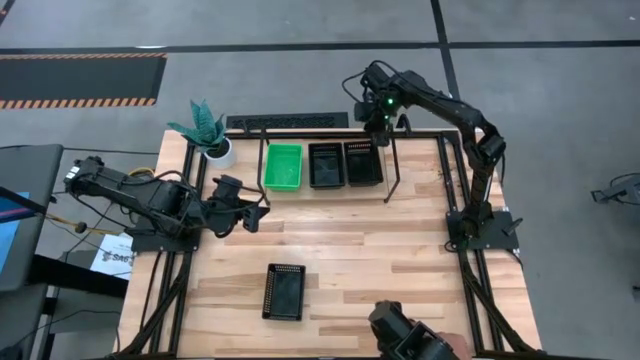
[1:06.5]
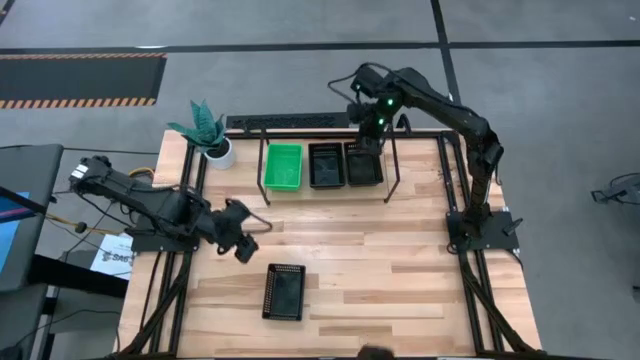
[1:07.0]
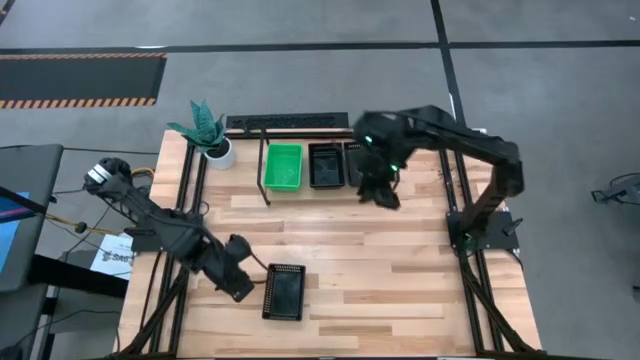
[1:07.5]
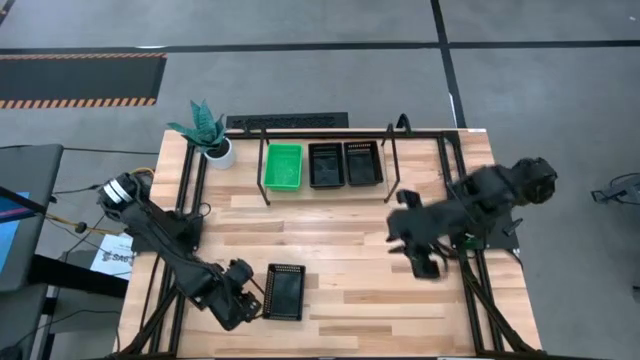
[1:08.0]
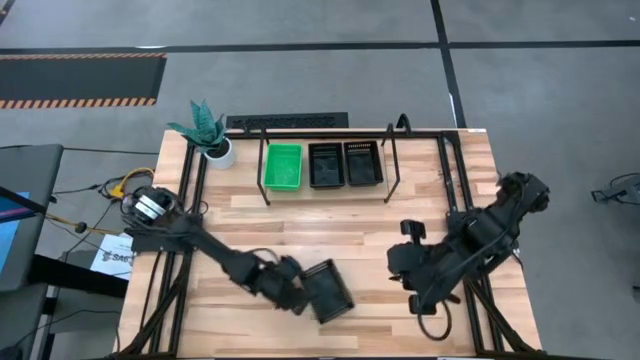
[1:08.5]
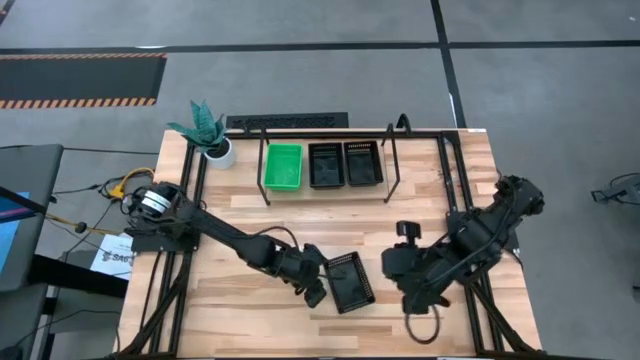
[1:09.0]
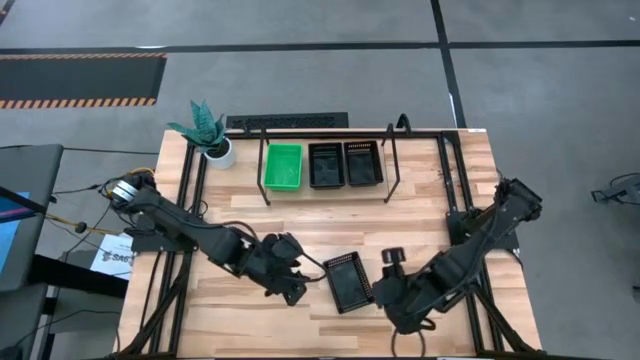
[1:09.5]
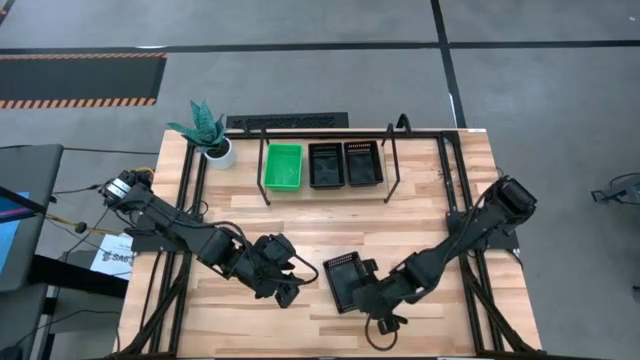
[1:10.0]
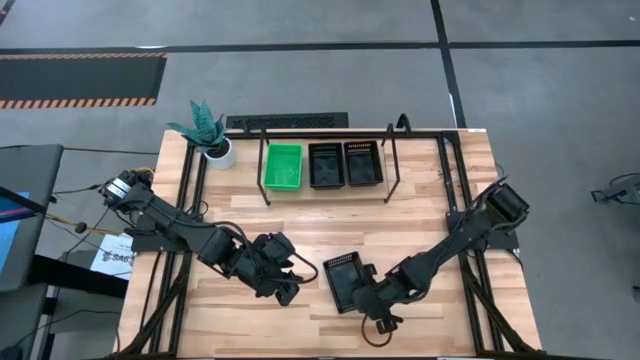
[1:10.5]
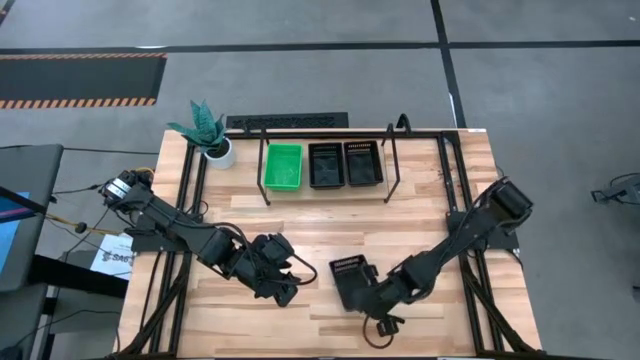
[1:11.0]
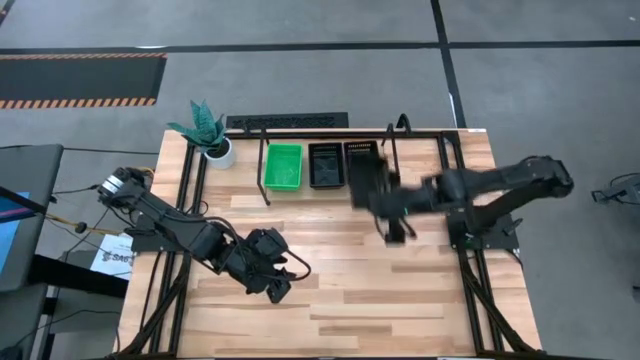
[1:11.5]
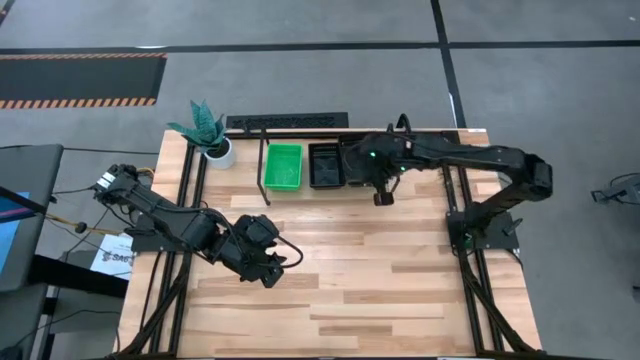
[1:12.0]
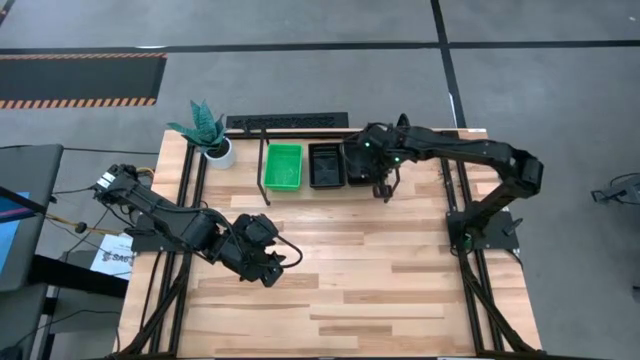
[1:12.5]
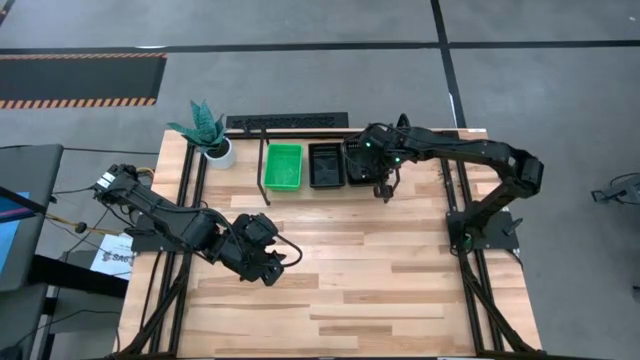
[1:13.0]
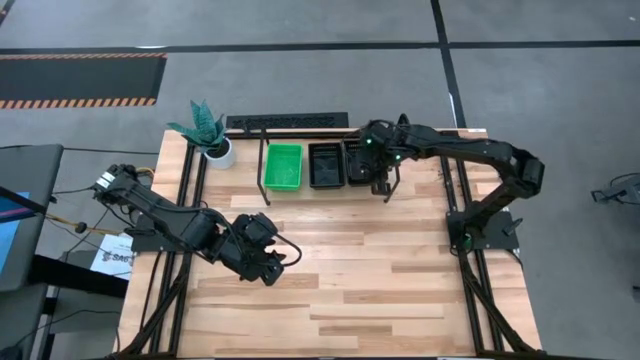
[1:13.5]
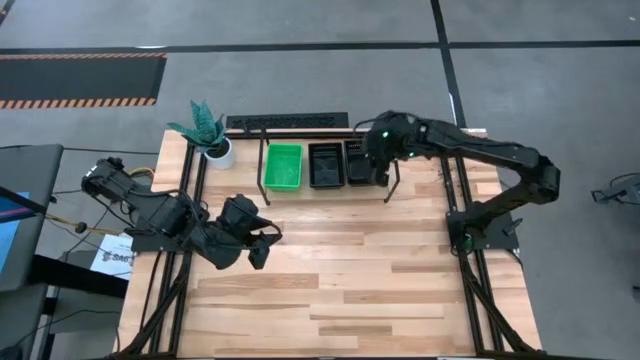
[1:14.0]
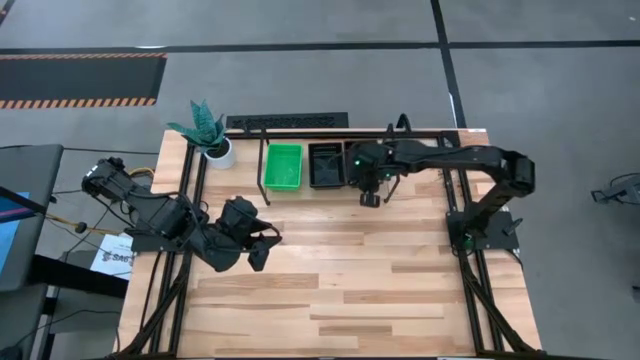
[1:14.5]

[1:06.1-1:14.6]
Task: Stack baskets on shelf by color
Stack the black bin on top of the black stacked bins on the shelf

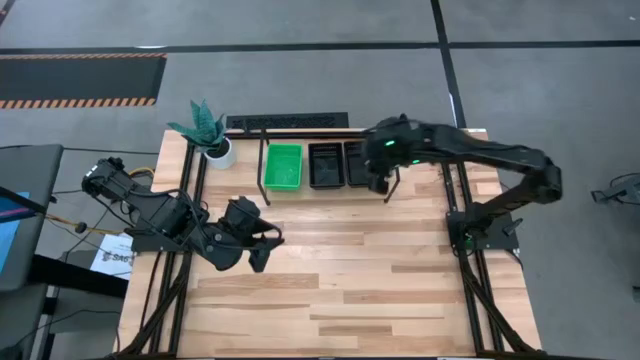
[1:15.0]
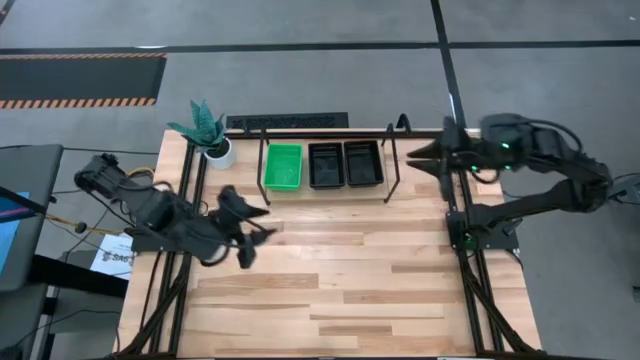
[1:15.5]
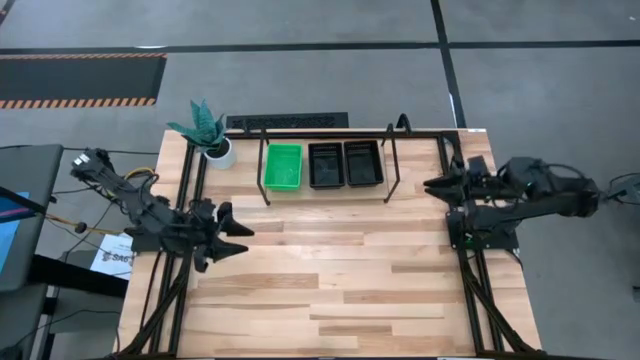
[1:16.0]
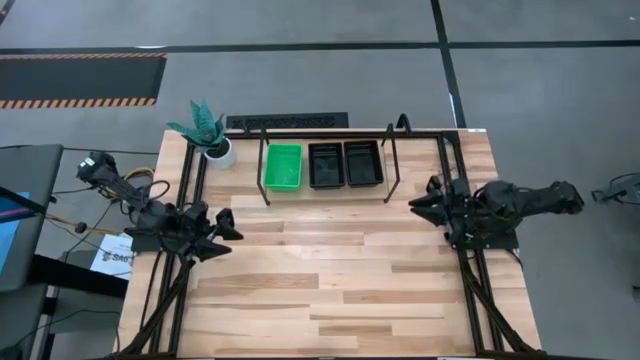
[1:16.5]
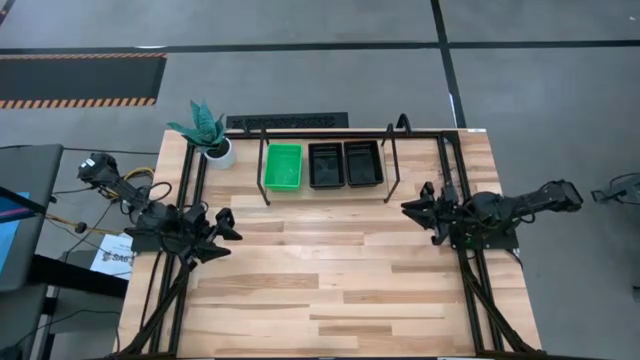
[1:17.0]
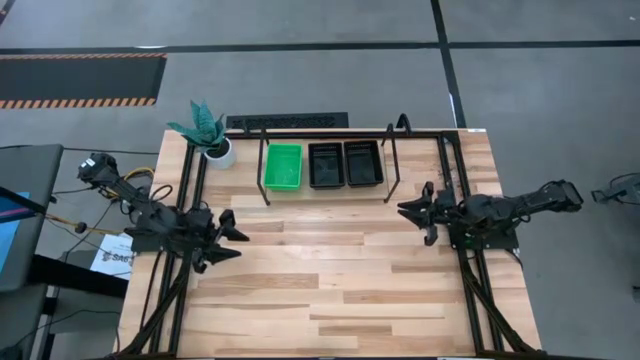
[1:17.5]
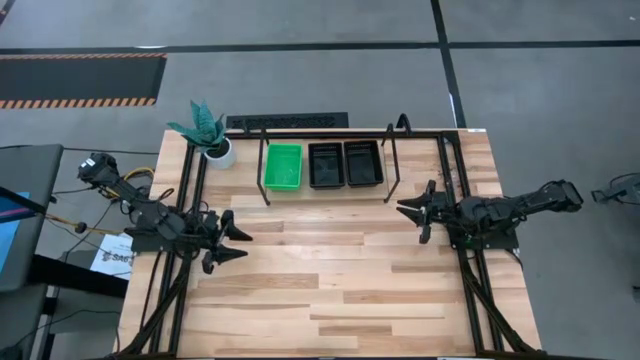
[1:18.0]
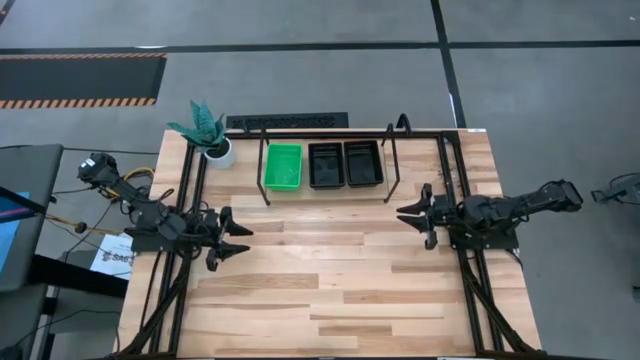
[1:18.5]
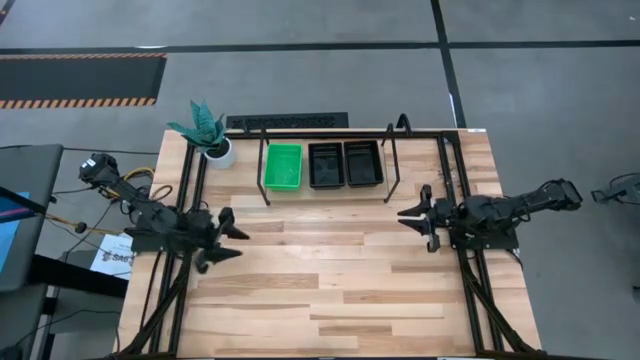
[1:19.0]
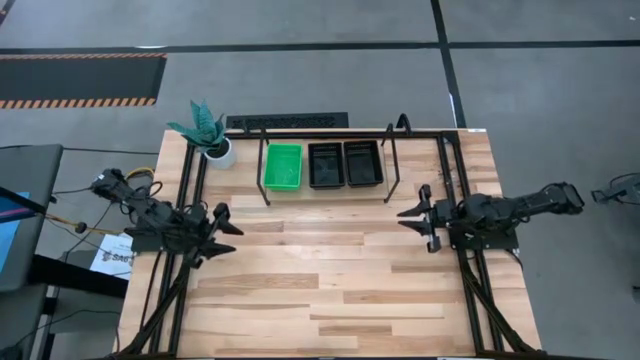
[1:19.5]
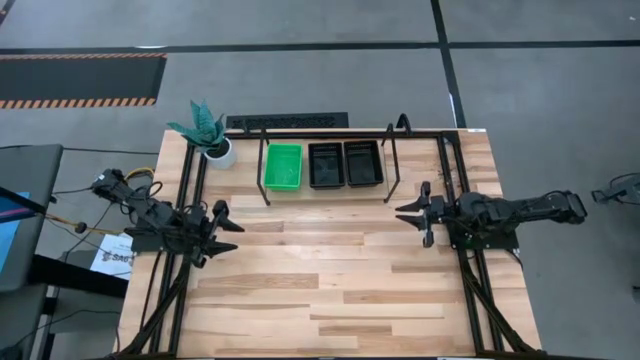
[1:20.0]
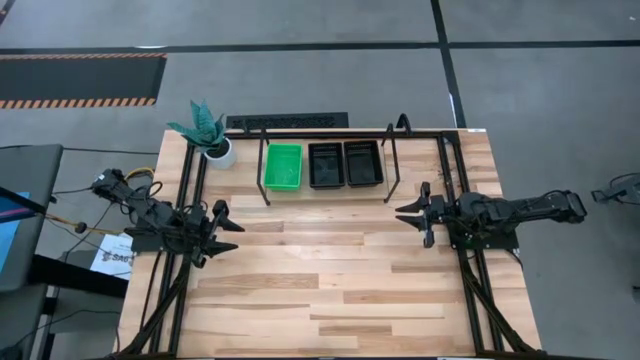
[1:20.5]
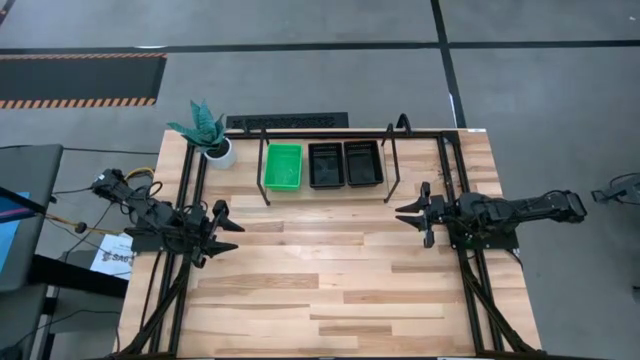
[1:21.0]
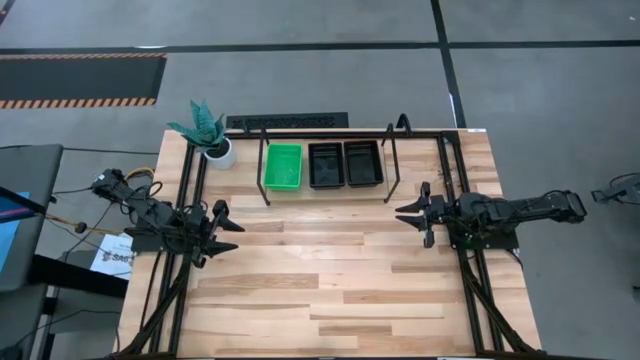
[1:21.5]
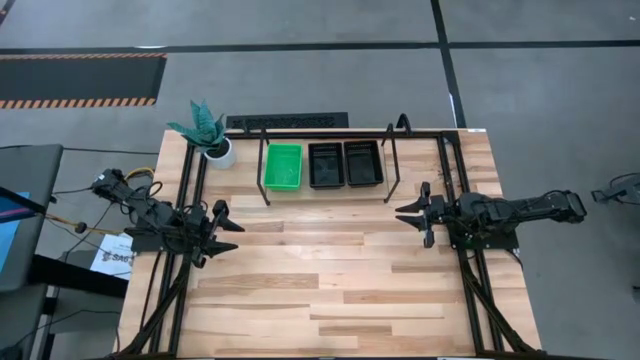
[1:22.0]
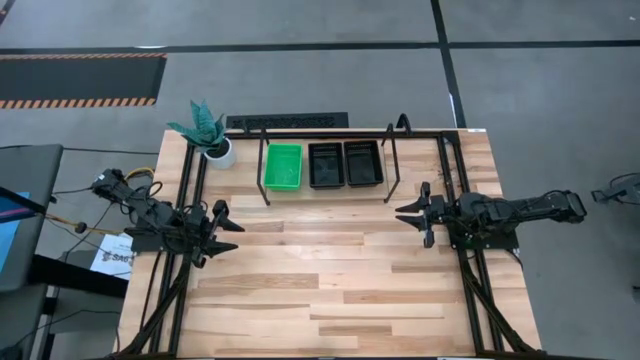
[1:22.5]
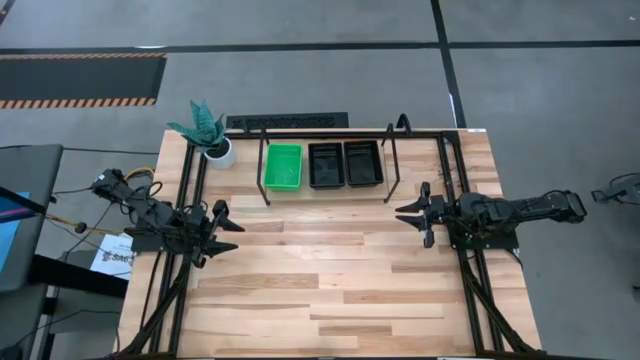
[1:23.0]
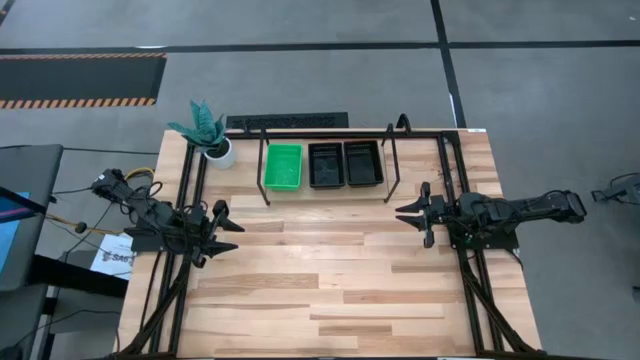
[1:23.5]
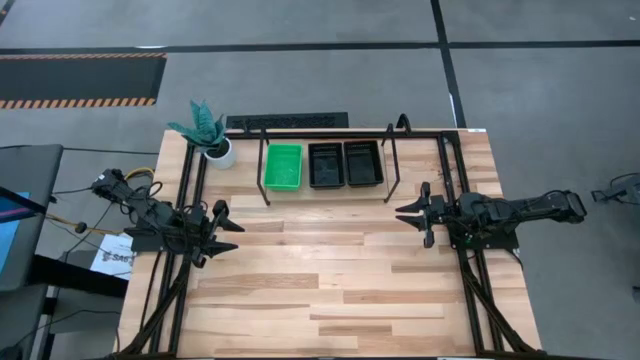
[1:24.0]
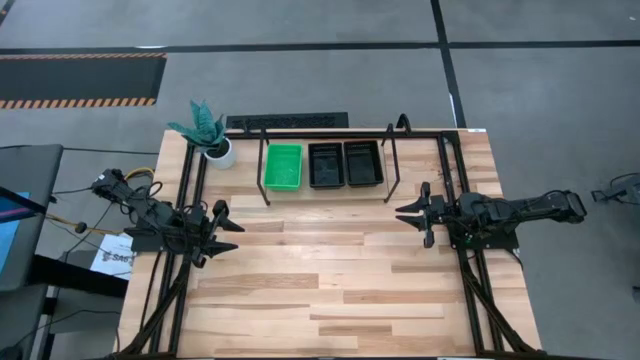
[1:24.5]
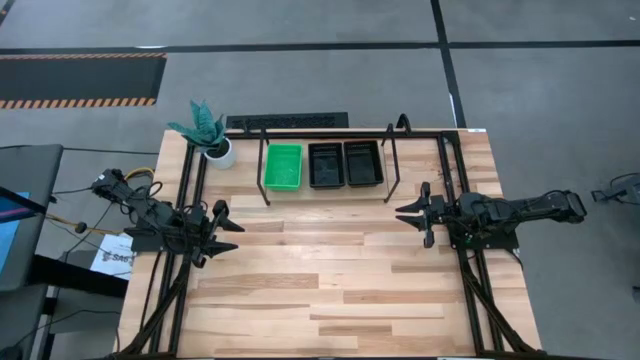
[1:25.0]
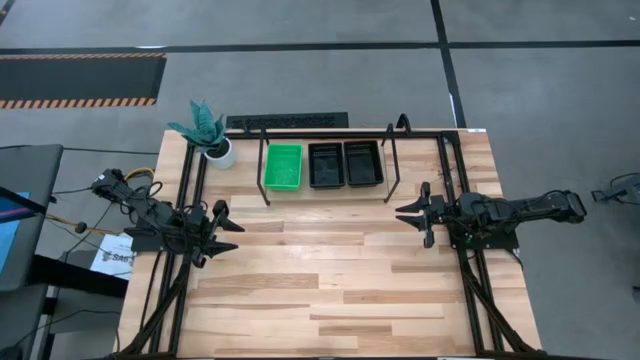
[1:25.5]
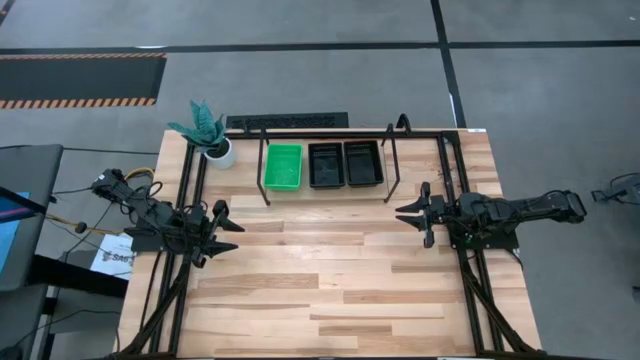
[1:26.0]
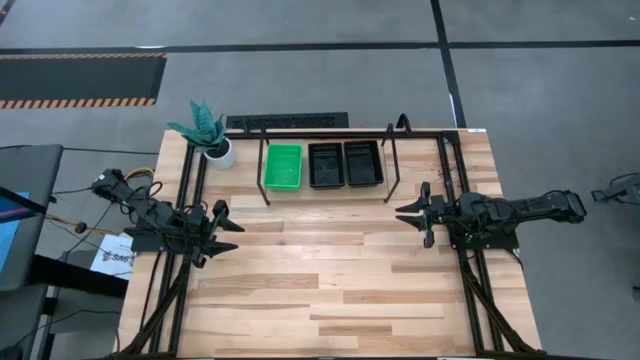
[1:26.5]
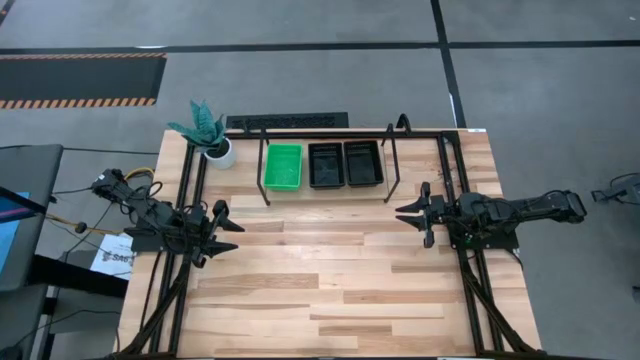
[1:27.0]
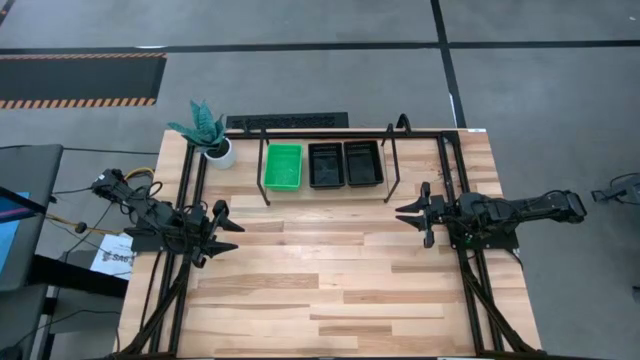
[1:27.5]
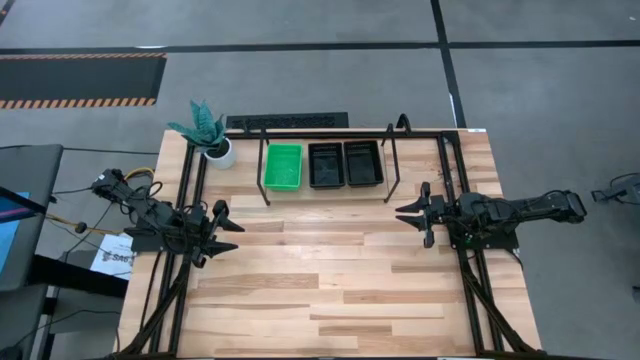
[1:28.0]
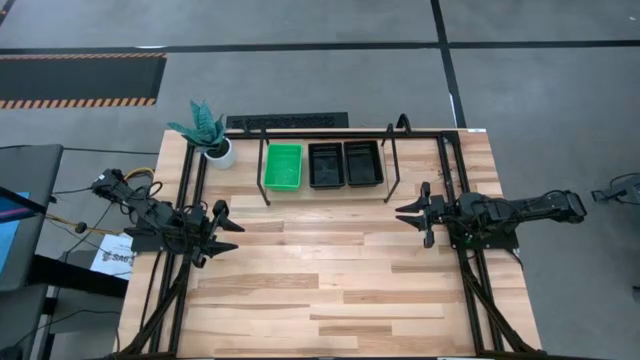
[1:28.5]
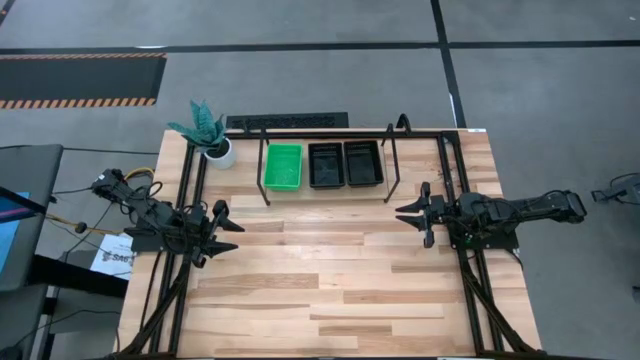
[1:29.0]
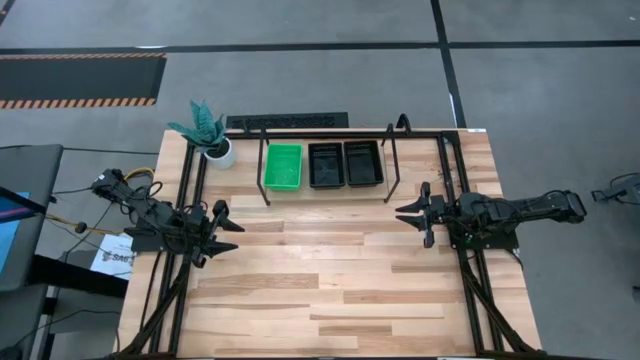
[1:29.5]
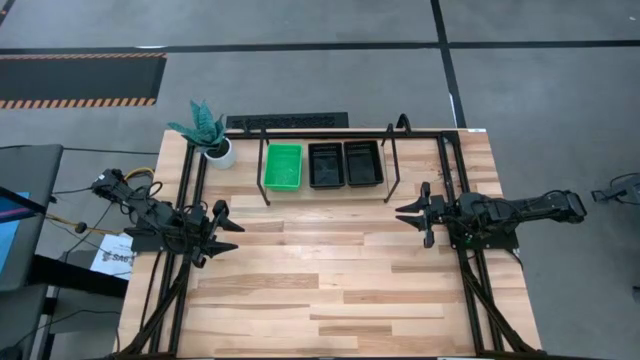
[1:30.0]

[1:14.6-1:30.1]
Return to Home Position
